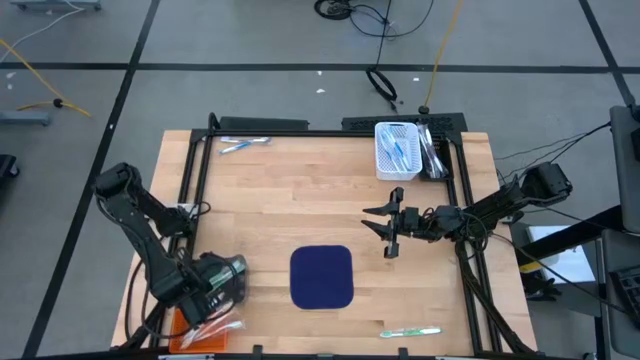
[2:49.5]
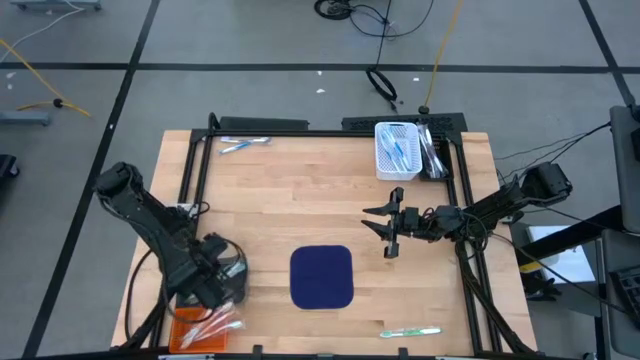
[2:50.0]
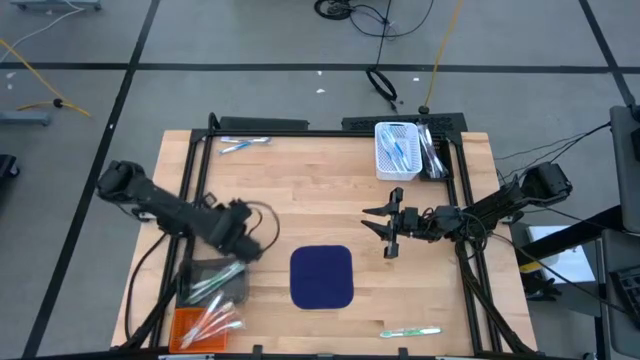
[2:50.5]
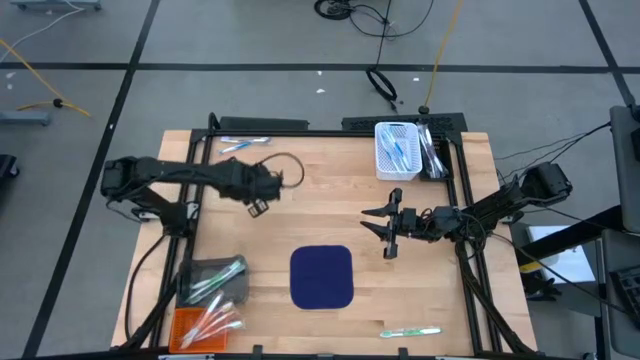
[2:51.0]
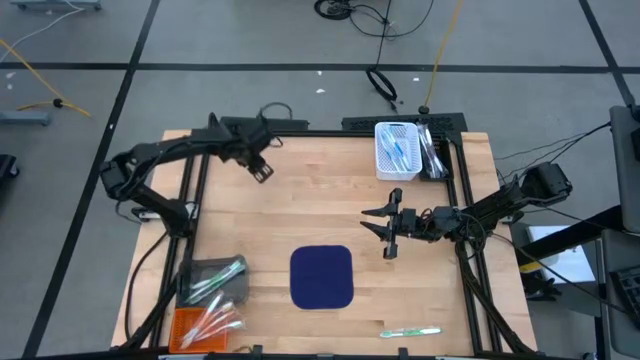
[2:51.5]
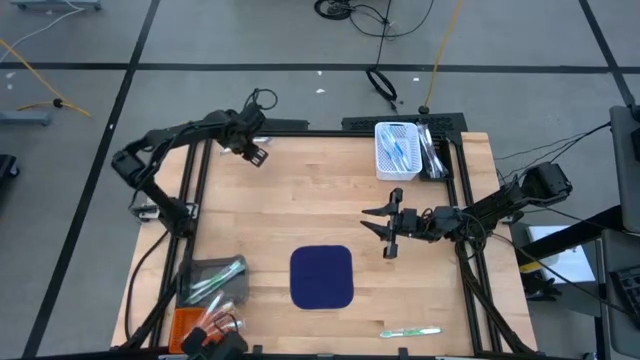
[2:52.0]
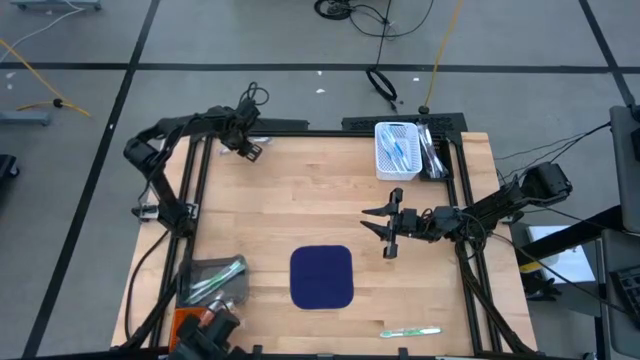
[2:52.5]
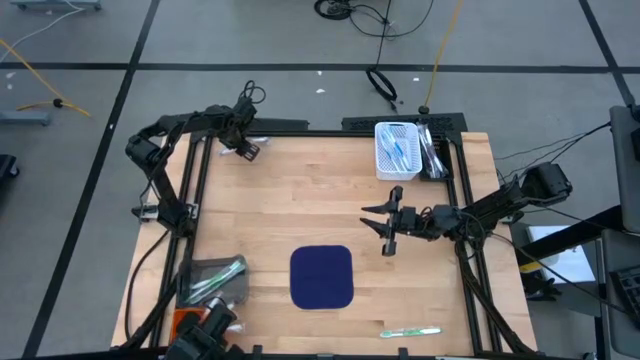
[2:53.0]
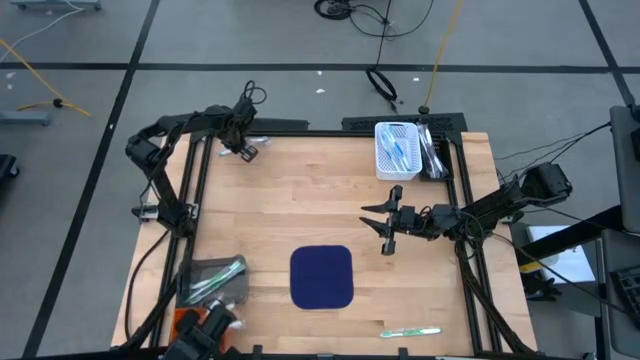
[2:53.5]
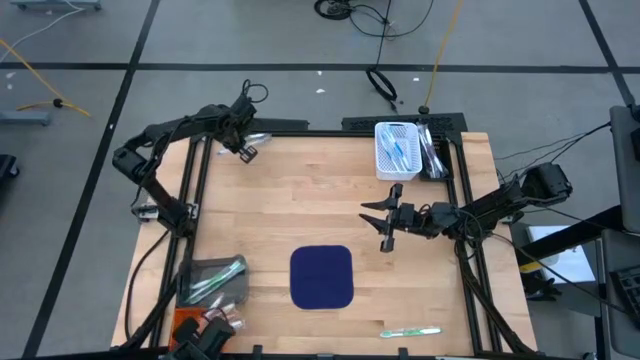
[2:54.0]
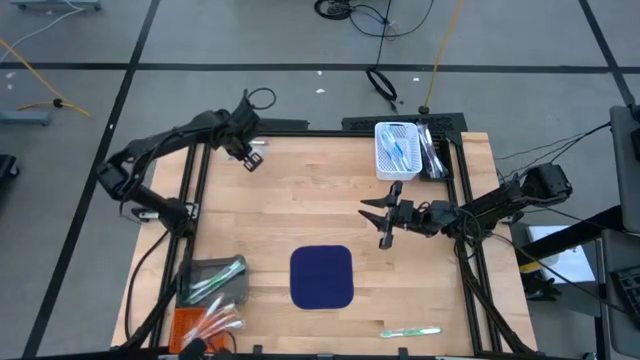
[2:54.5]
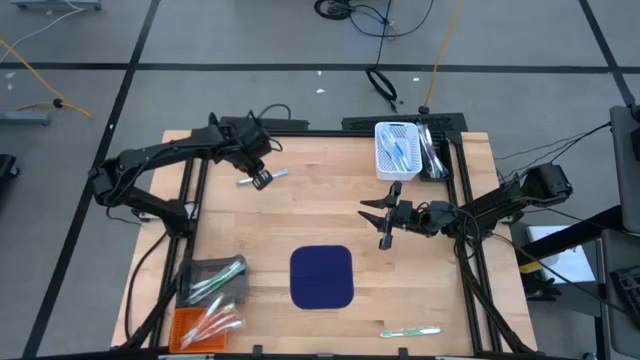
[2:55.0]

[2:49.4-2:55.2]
Task: Pick & Place Toothbrushes
Put the blue toothbrush into the white bin

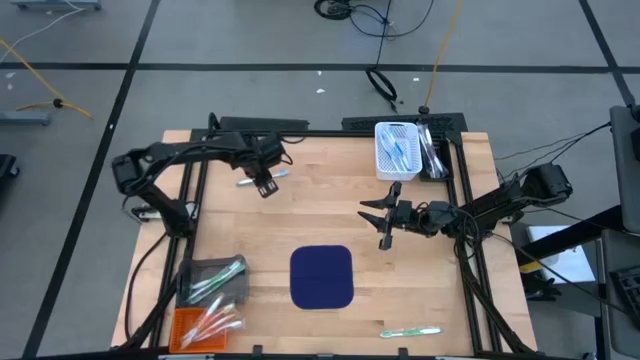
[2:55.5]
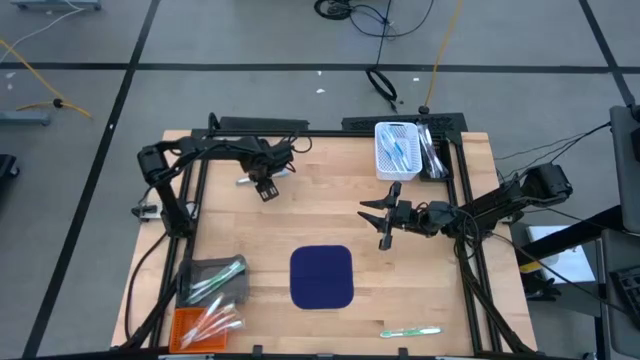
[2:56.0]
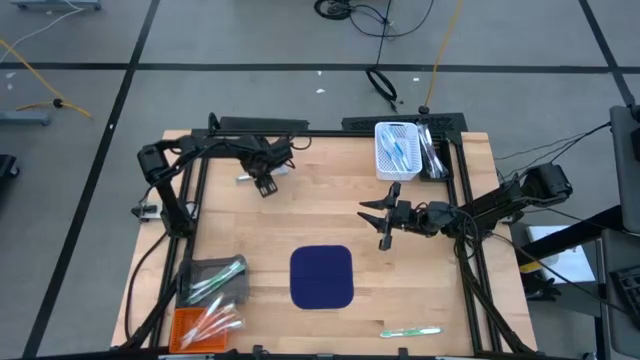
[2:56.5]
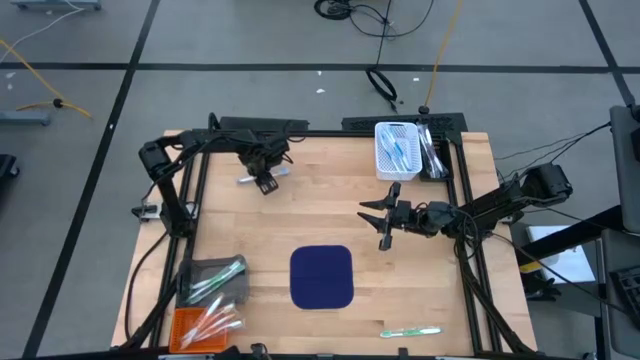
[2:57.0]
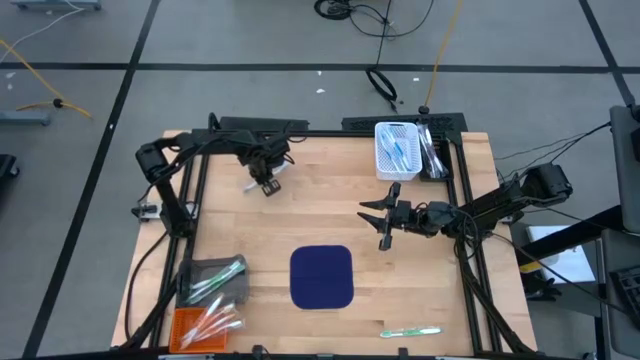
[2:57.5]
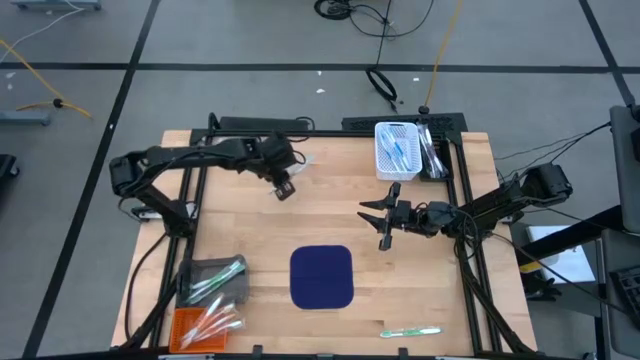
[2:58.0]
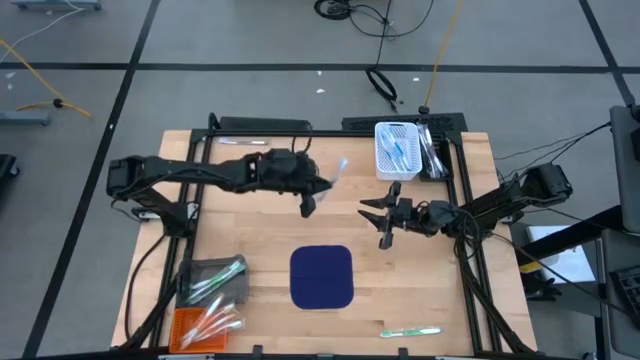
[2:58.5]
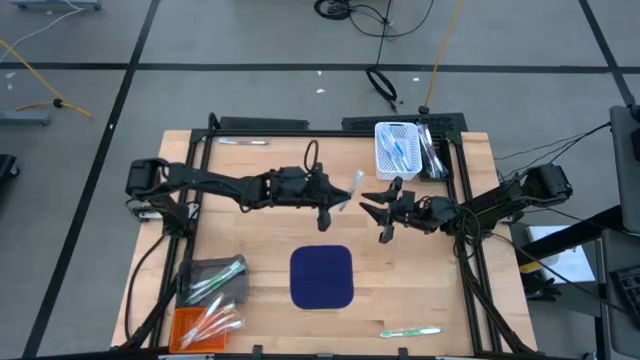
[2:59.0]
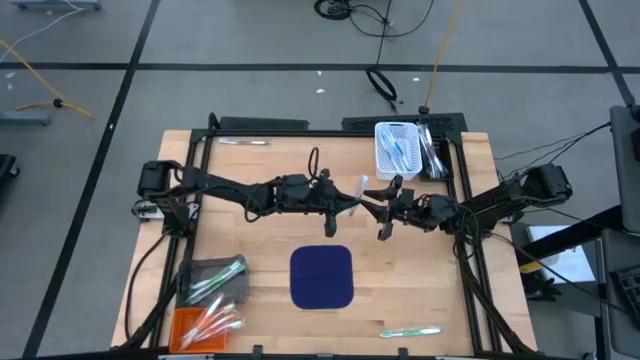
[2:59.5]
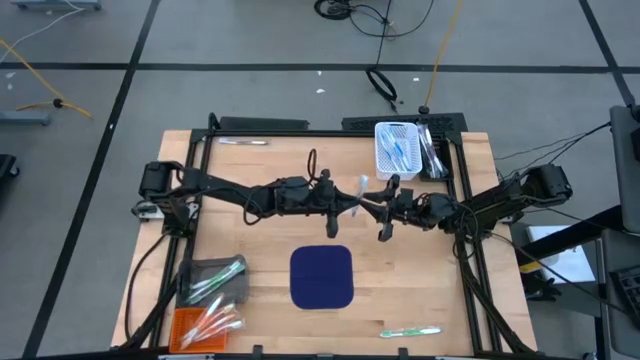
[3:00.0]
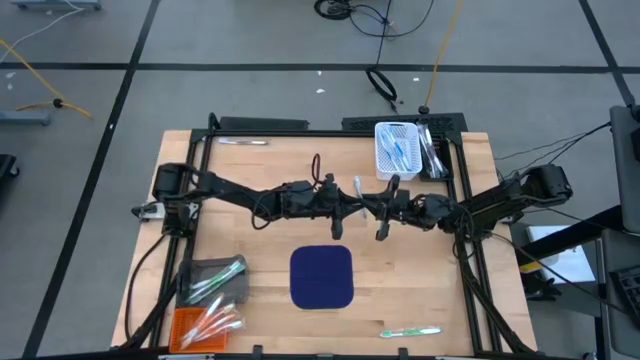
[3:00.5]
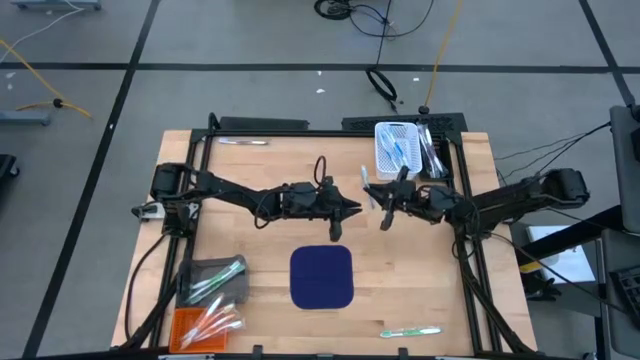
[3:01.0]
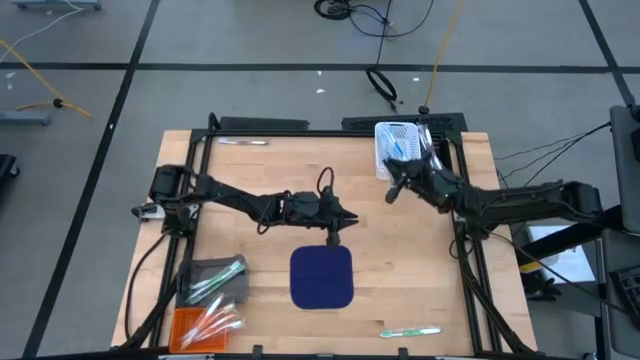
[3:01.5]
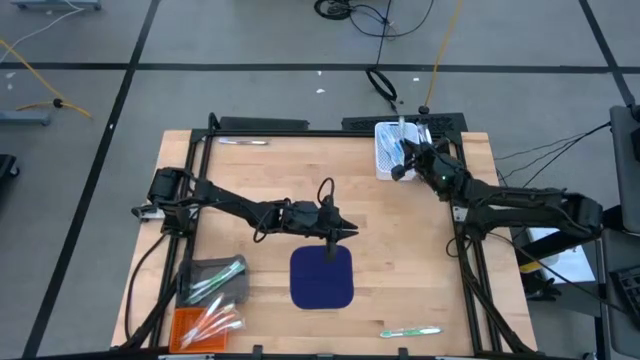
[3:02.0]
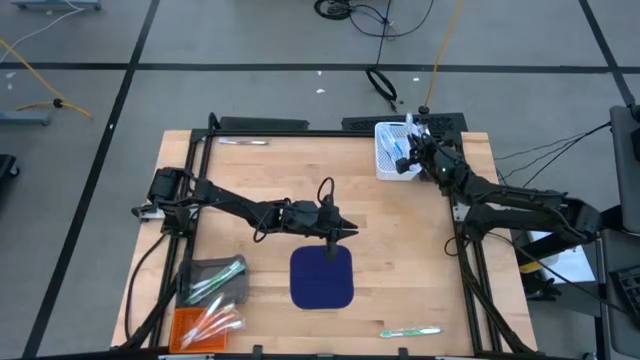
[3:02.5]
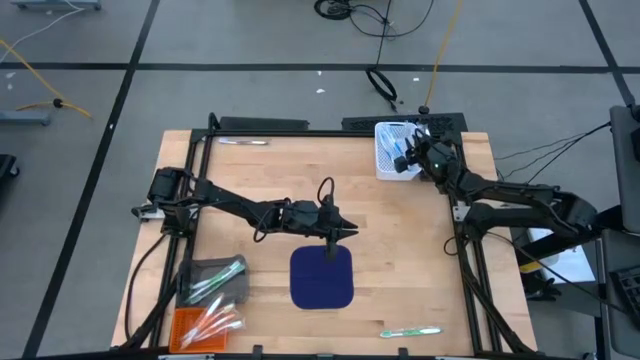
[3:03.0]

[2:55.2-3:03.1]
Put the blue toothbrush into the white bin

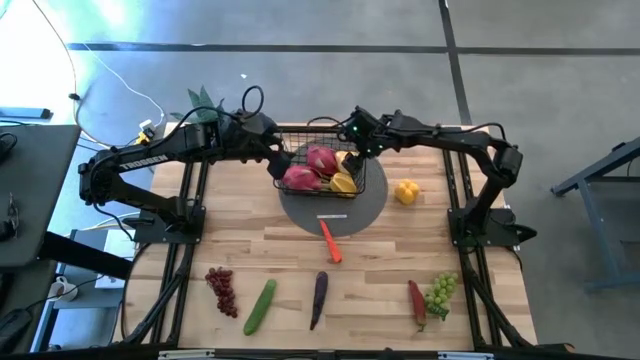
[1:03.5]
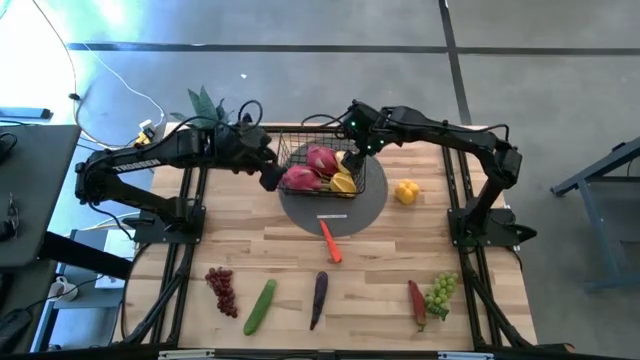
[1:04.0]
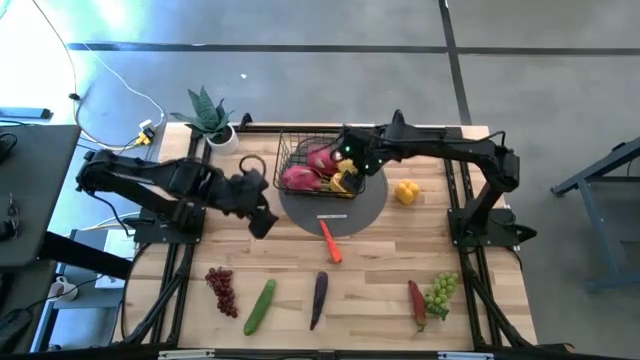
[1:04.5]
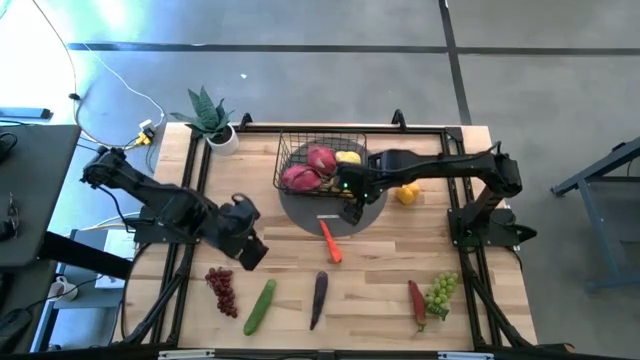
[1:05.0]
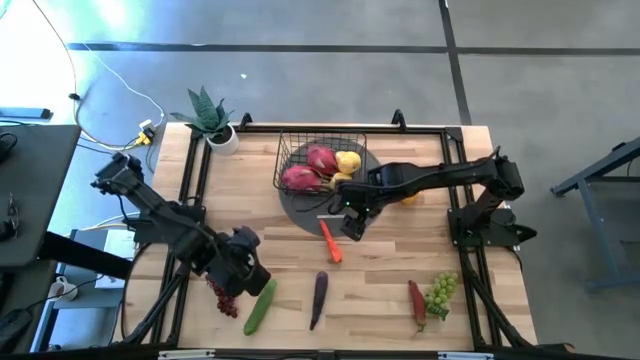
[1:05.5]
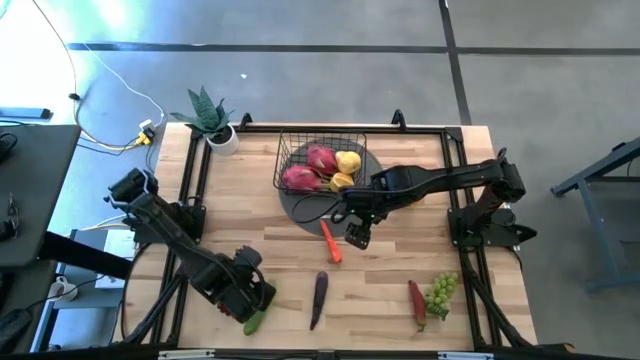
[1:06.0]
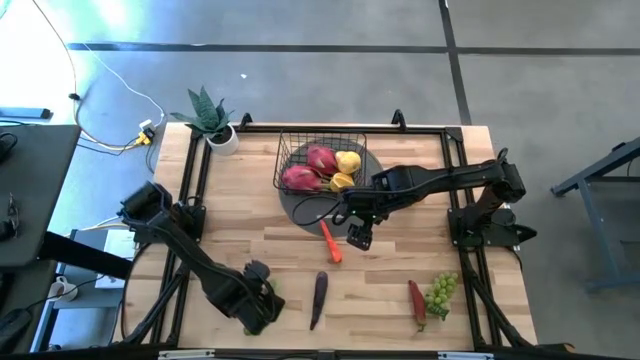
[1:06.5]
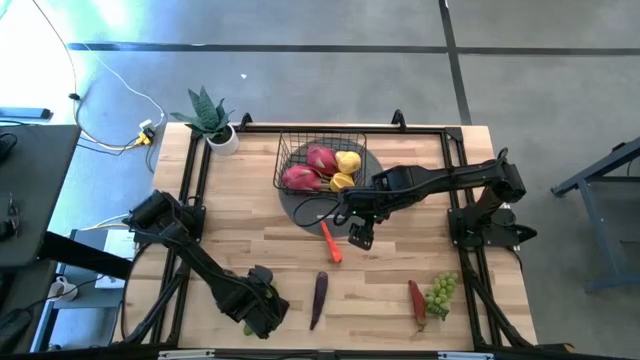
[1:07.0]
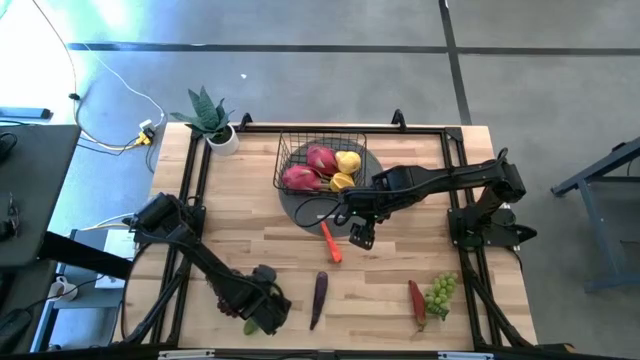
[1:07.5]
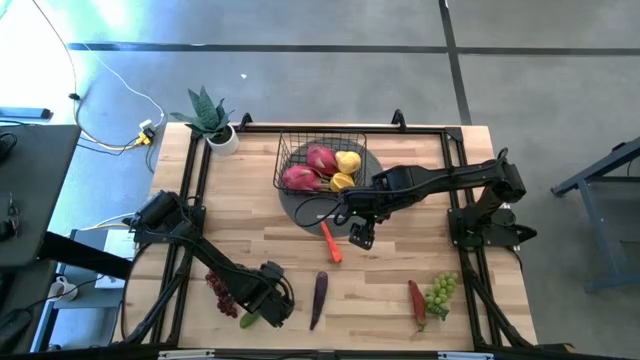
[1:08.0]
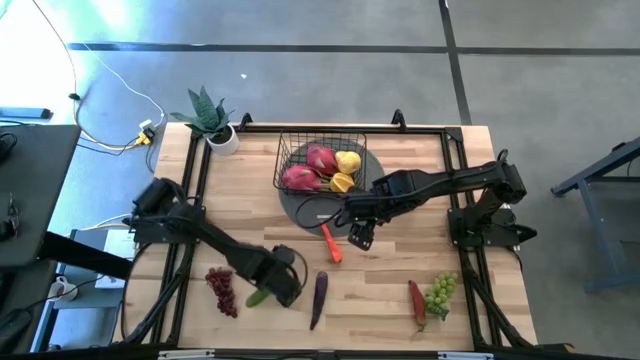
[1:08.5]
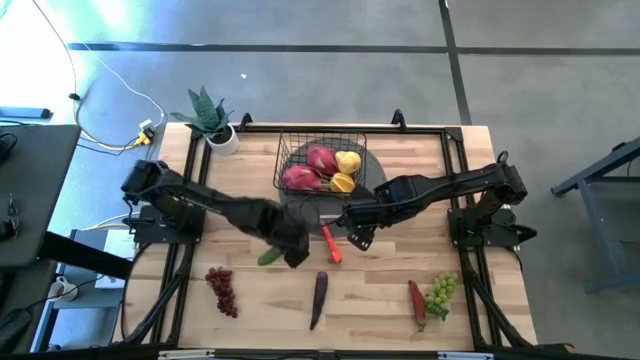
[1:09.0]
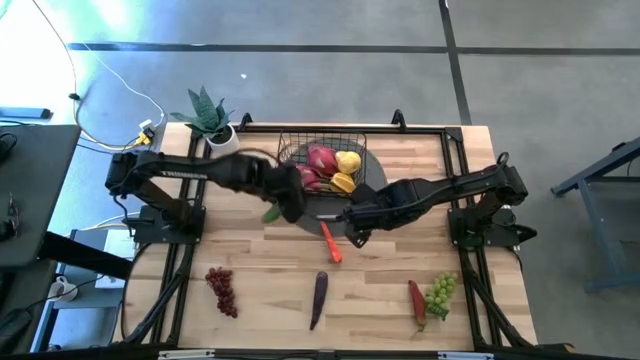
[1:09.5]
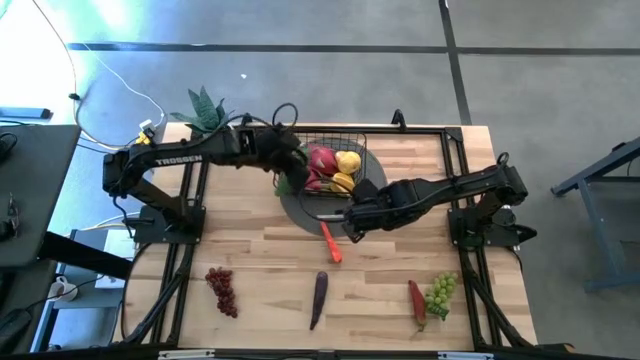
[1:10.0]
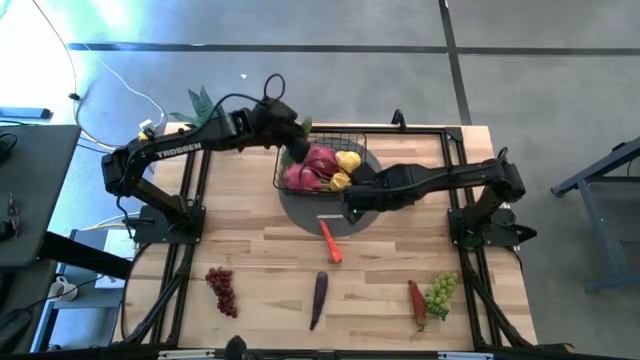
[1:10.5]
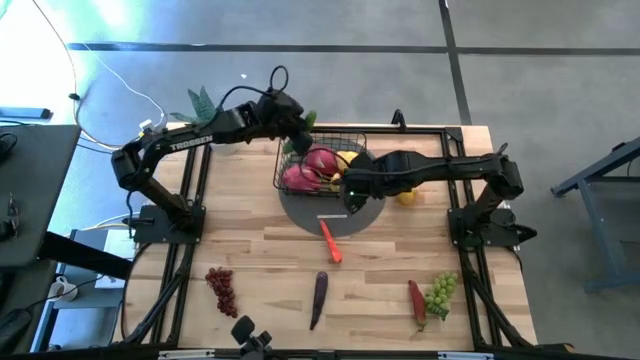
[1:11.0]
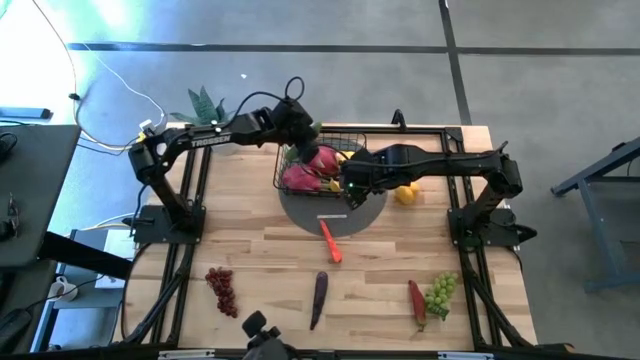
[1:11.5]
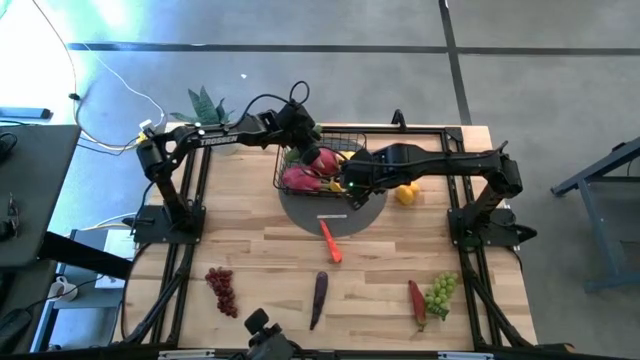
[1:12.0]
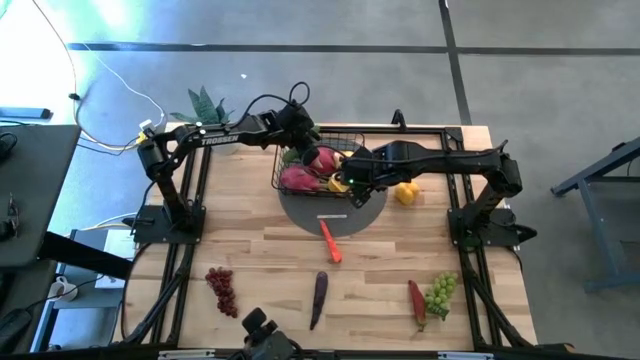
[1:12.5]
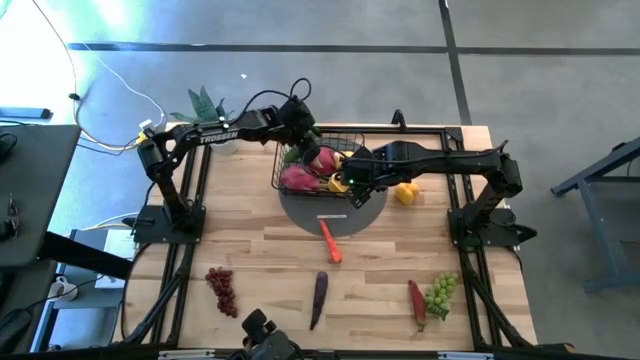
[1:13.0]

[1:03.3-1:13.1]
Task: Build produce basket
Put the green cucumber into the black wire basket
